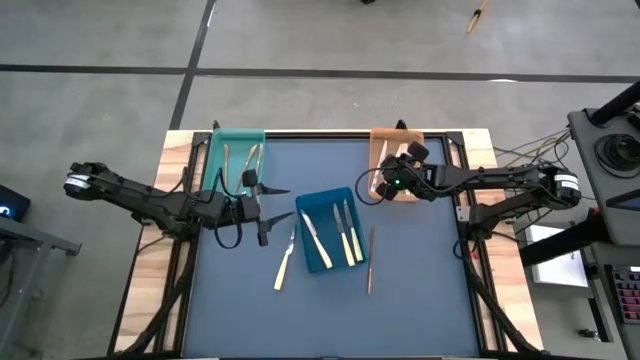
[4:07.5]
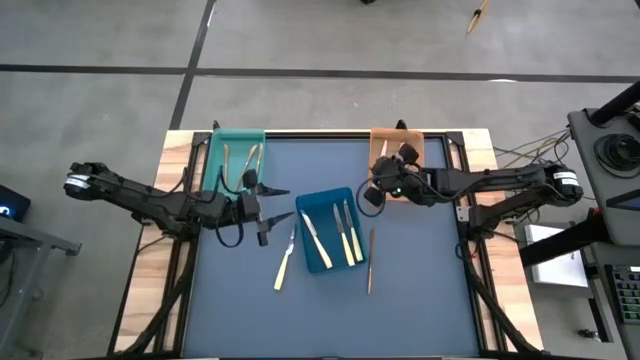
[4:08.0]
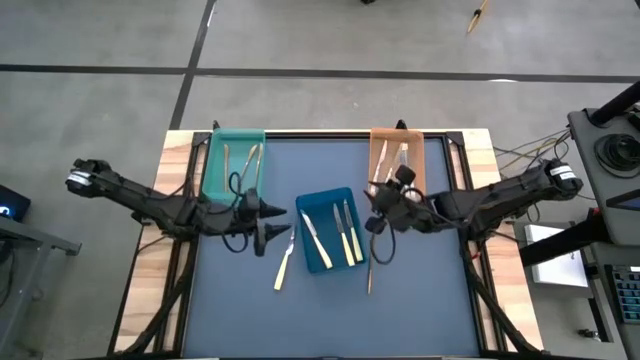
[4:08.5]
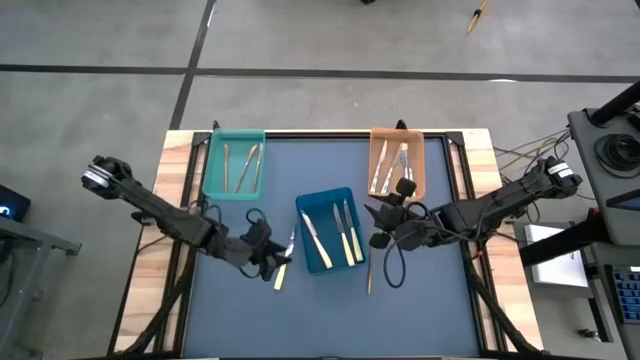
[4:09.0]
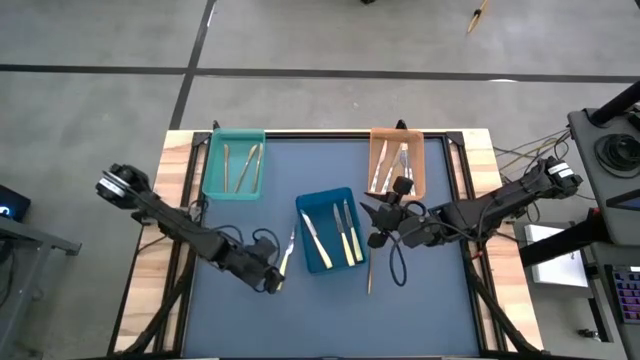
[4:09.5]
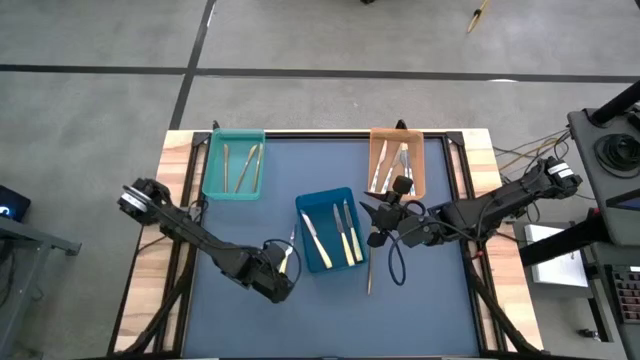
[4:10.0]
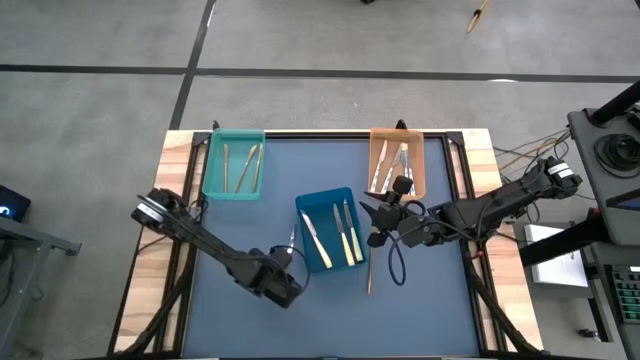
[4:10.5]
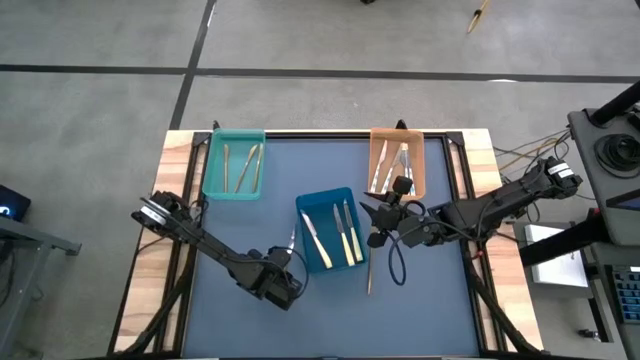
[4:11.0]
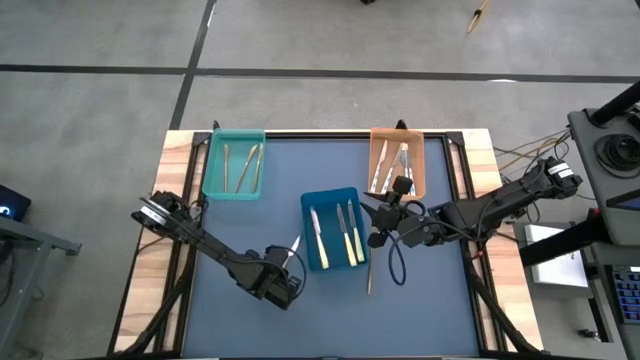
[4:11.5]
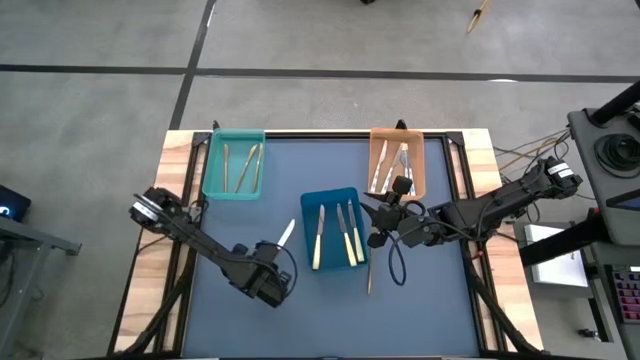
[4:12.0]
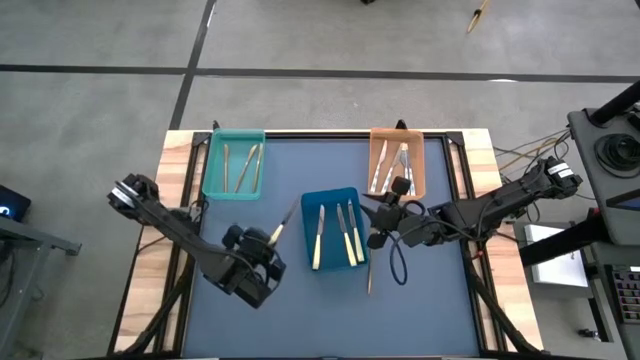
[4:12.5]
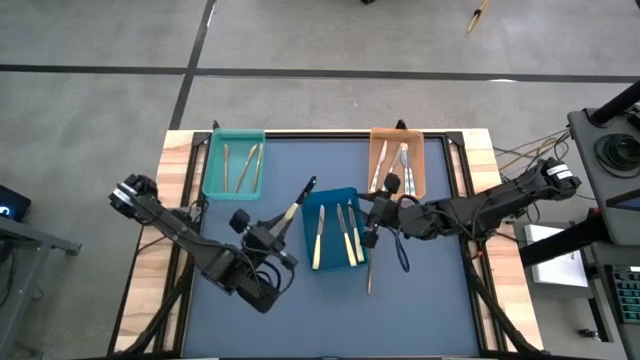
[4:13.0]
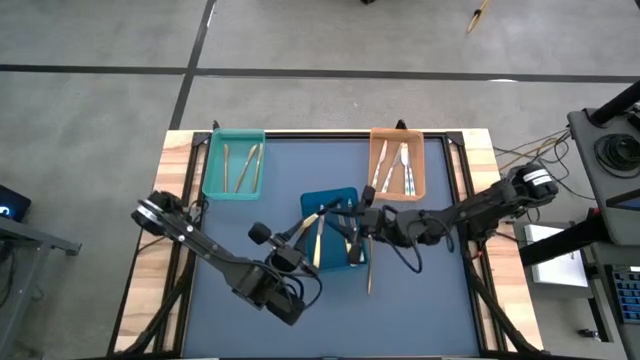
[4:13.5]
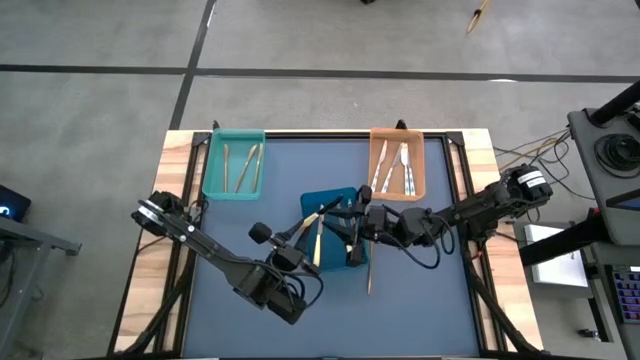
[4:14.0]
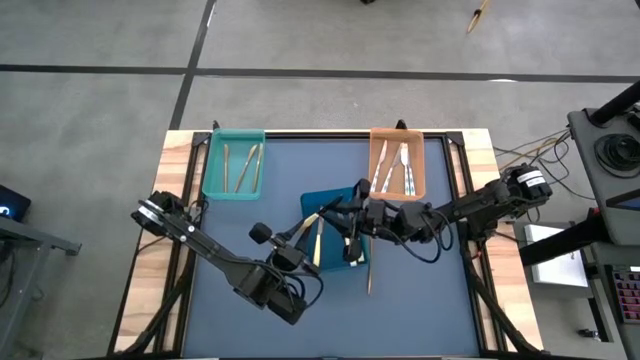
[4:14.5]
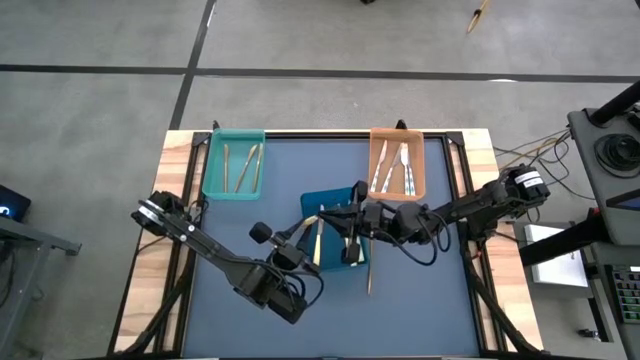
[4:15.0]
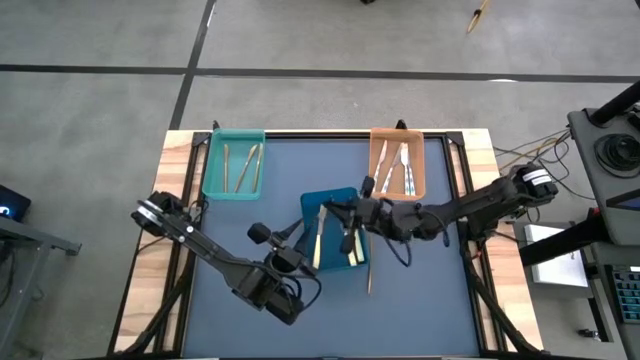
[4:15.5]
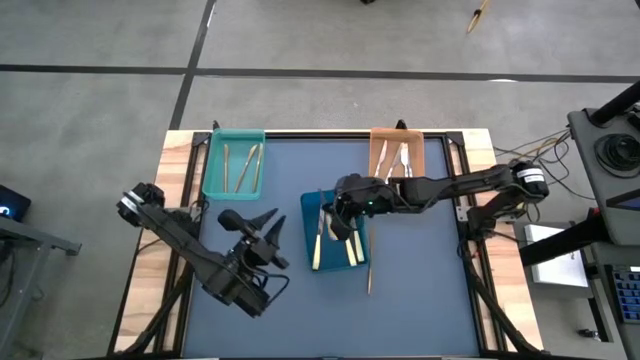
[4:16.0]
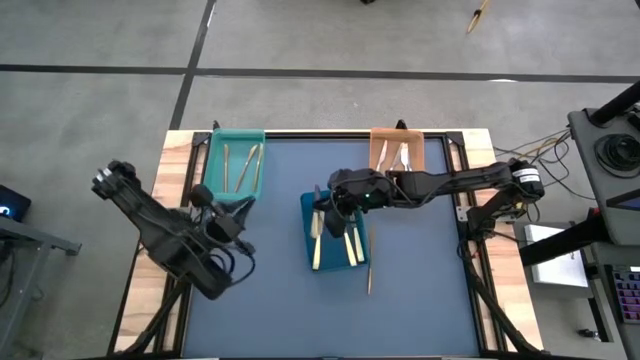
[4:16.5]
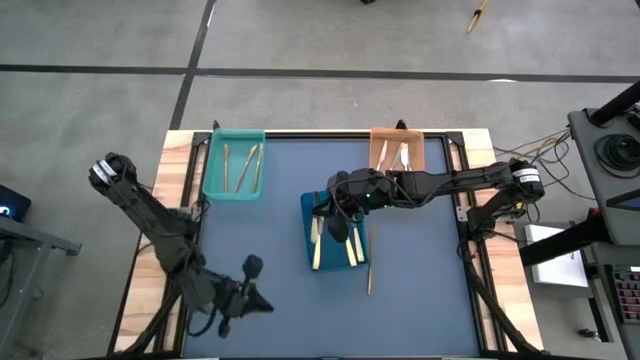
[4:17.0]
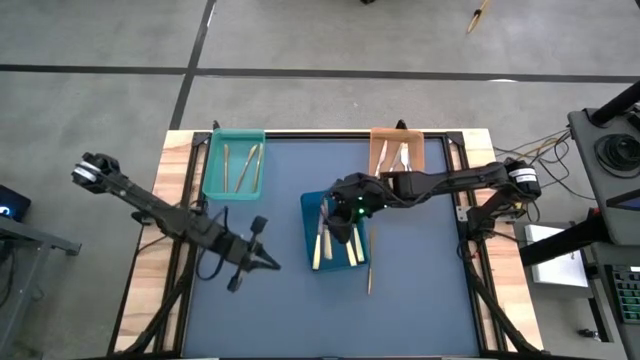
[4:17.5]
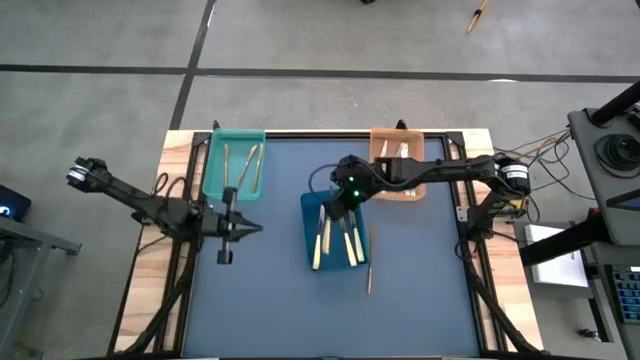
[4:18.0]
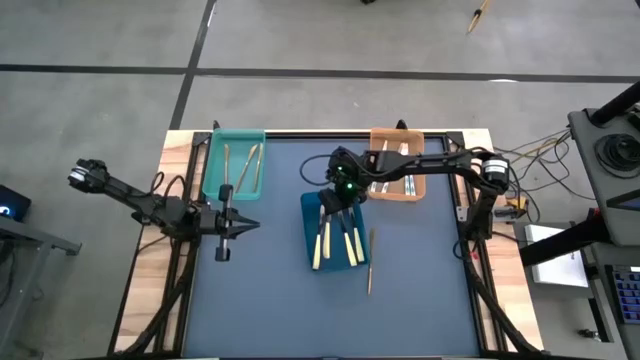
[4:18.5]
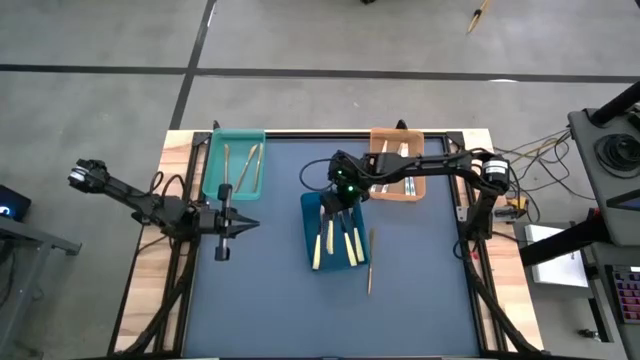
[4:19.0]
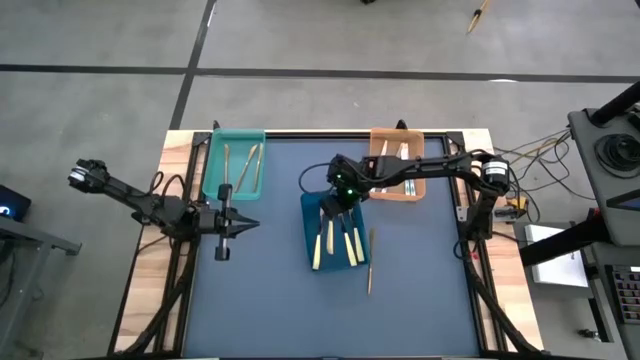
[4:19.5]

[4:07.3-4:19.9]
Task: Sort silverware by color (type)
Put the yellow knife into the blue bin

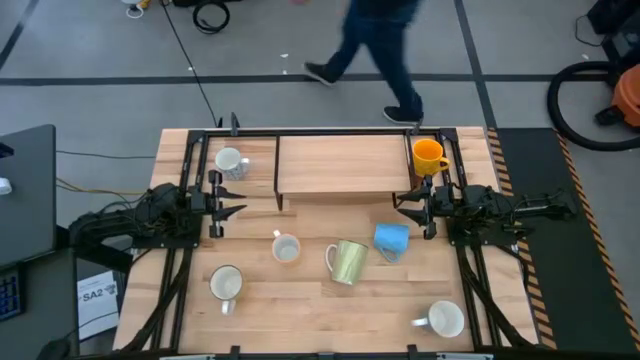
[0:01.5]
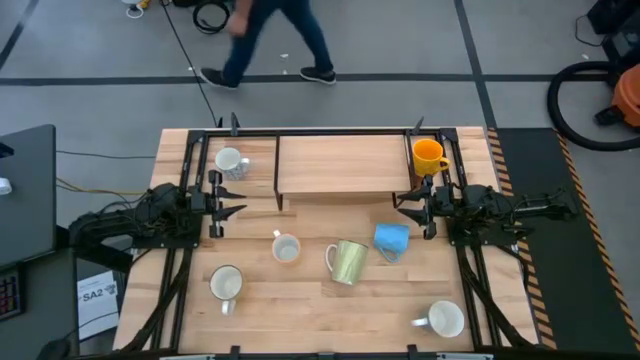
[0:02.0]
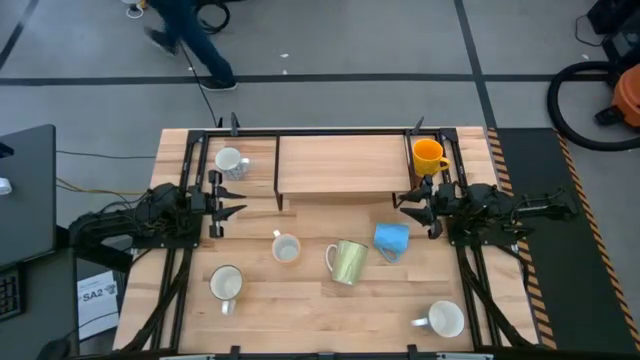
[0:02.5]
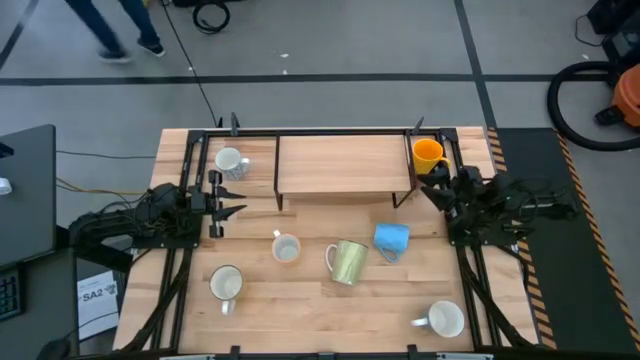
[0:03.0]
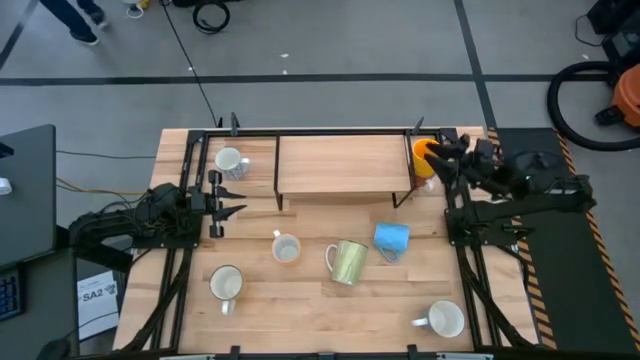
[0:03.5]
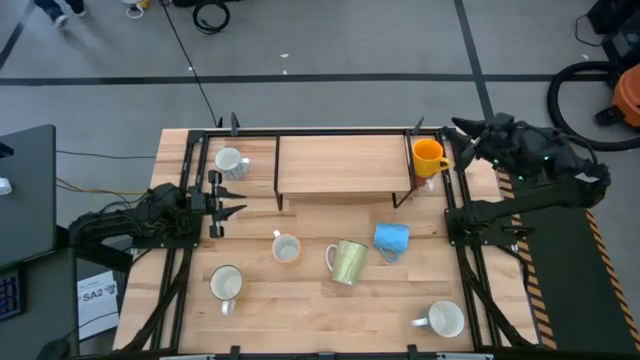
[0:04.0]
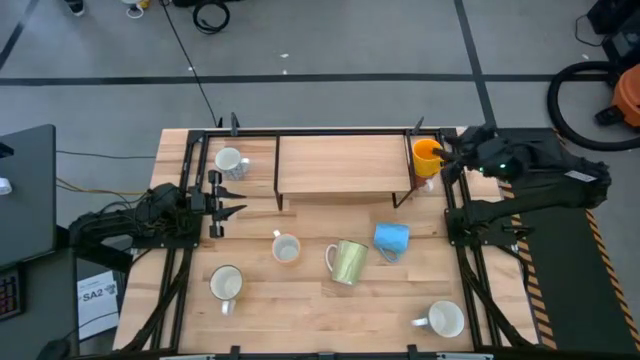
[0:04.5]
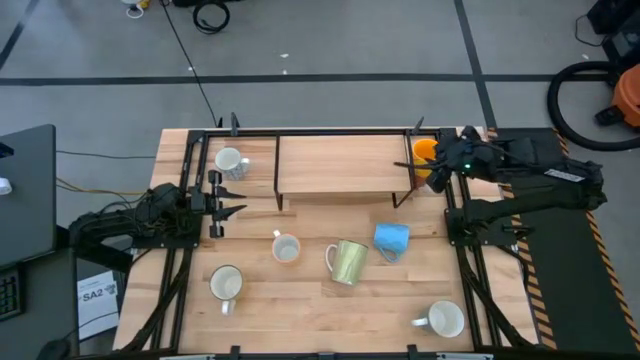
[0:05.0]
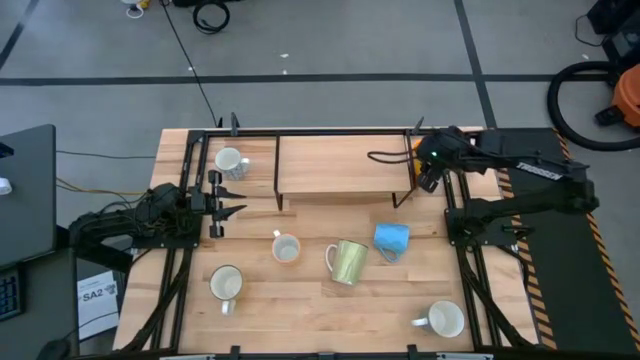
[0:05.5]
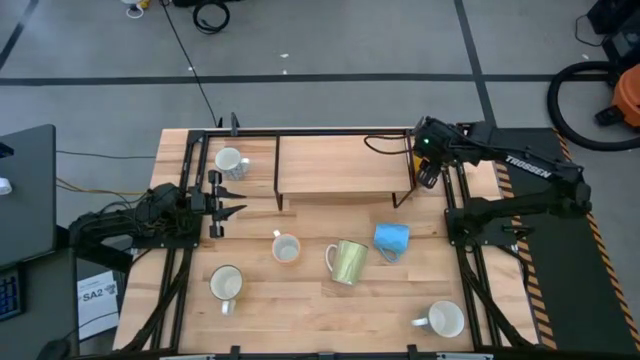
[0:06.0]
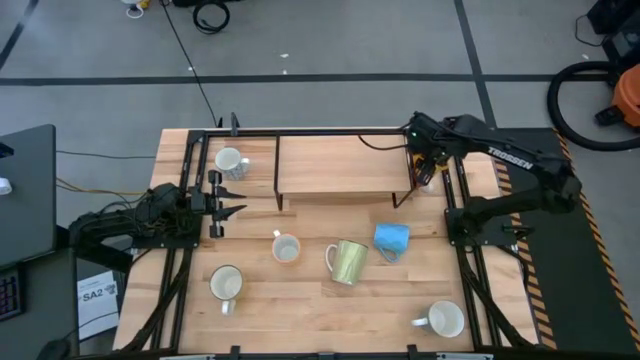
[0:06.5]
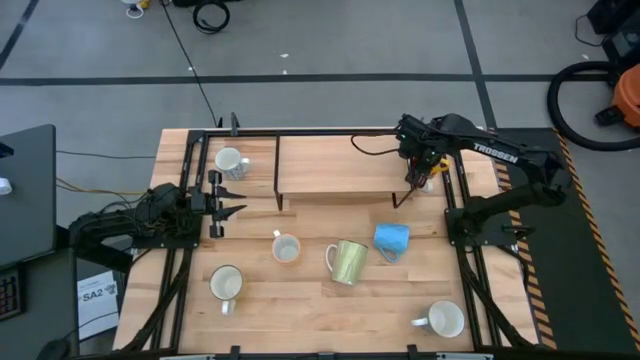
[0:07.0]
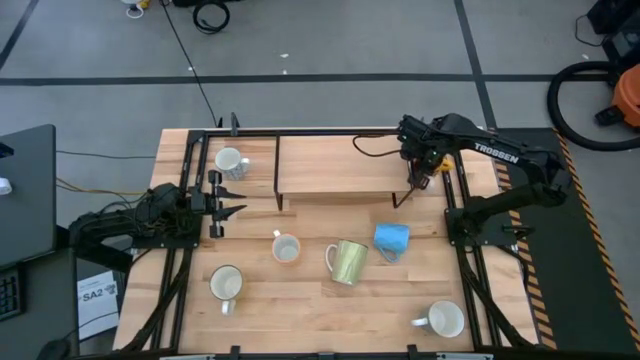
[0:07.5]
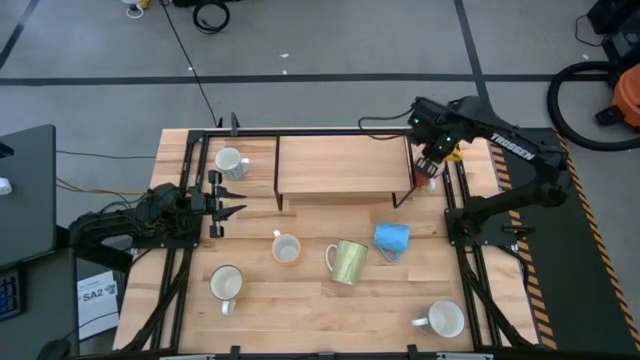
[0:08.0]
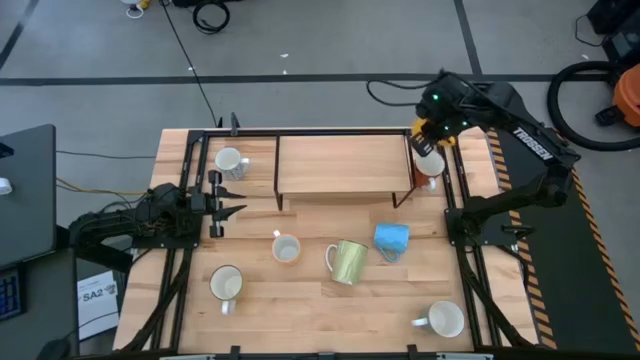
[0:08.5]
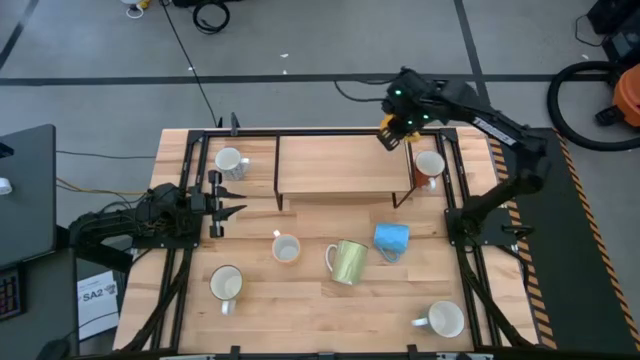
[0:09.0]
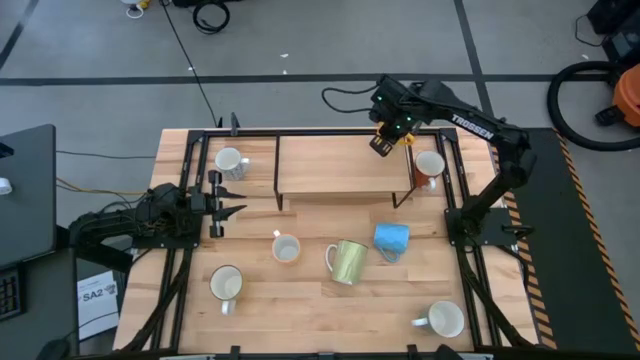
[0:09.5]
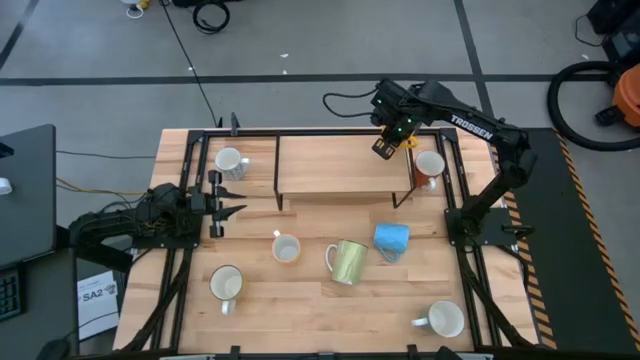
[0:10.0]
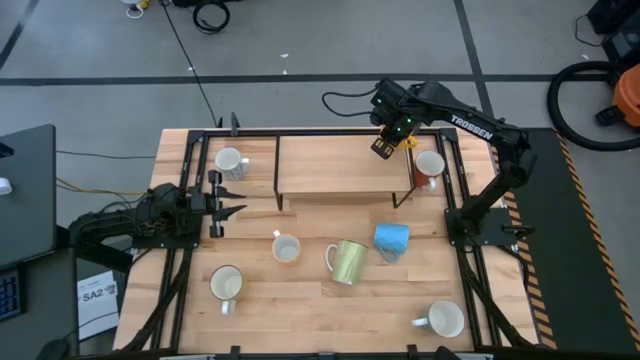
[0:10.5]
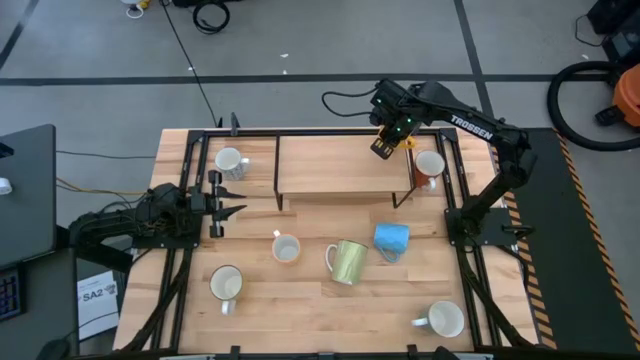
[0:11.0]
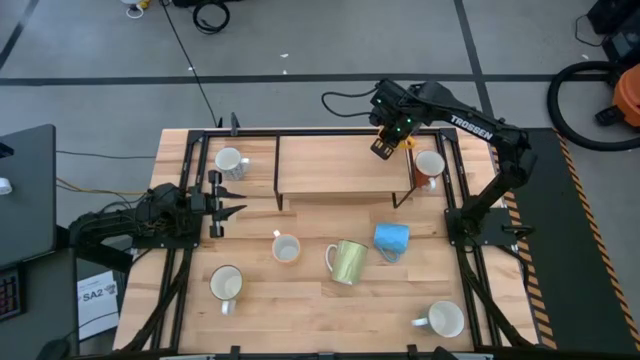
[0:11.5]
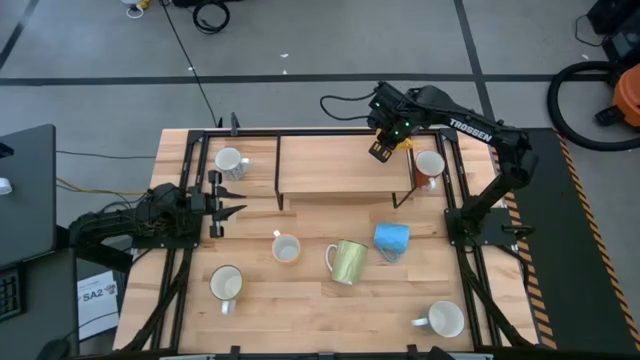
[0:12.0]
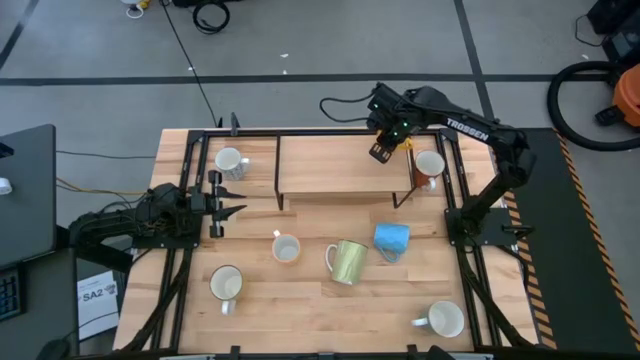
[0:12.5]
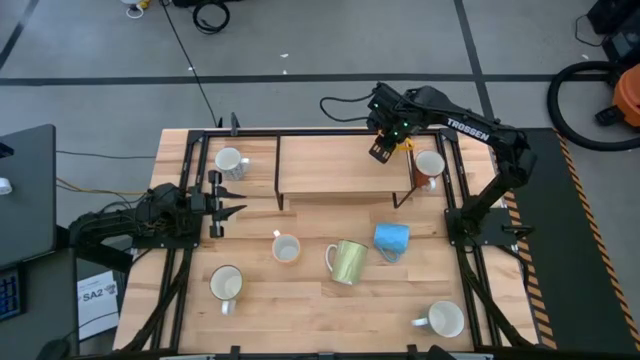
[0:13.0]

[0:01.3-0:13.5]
Task: Place coffee mugs
Put the yellow mug on the shelf
